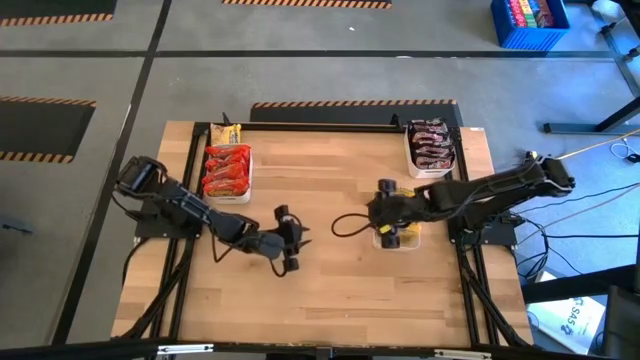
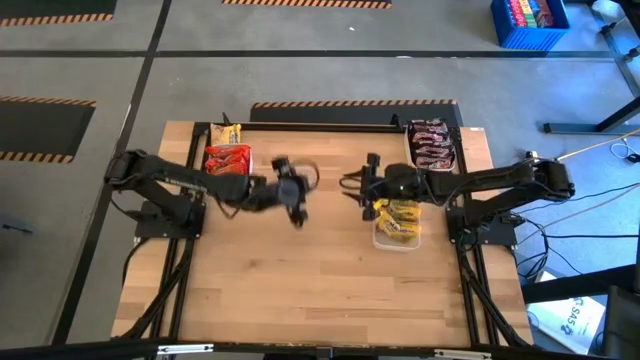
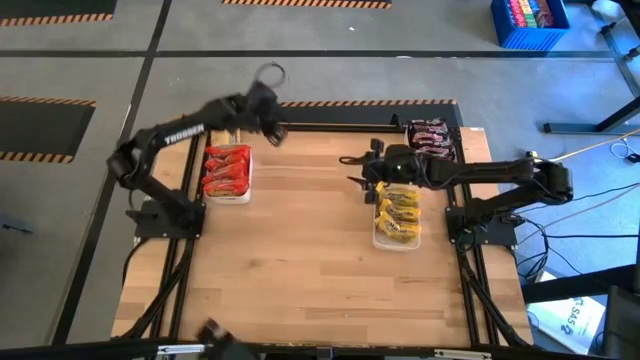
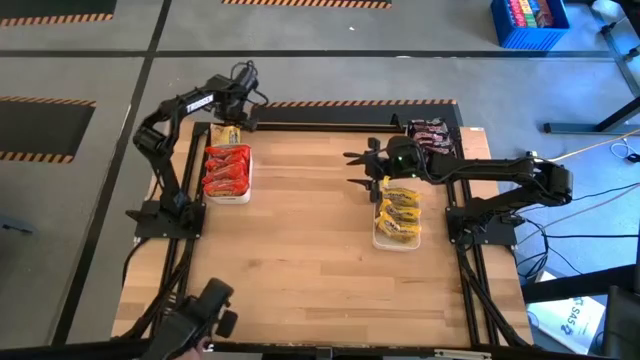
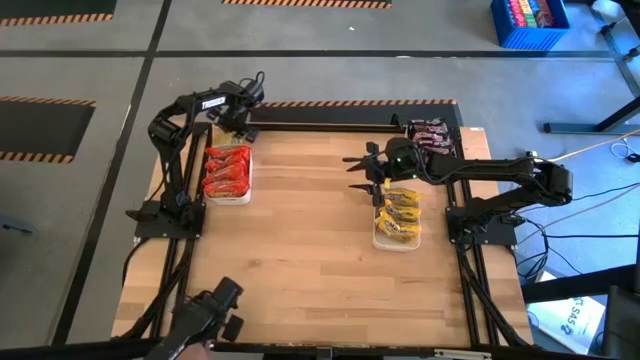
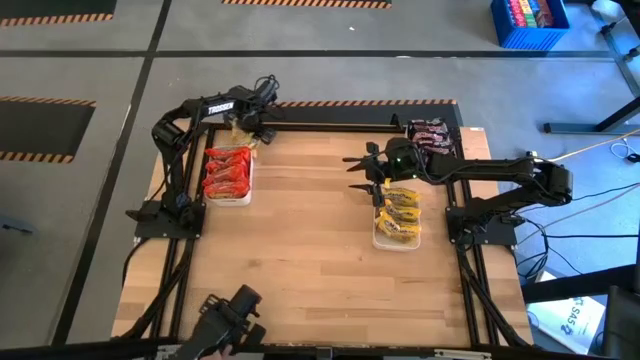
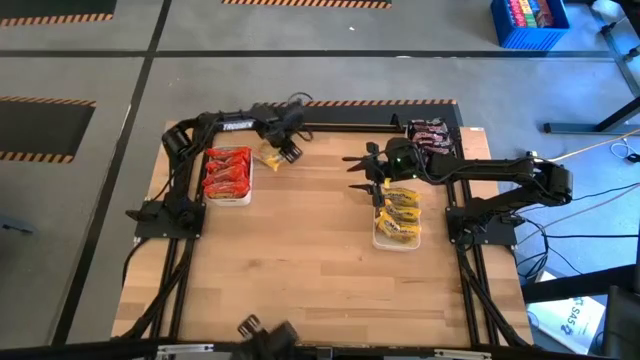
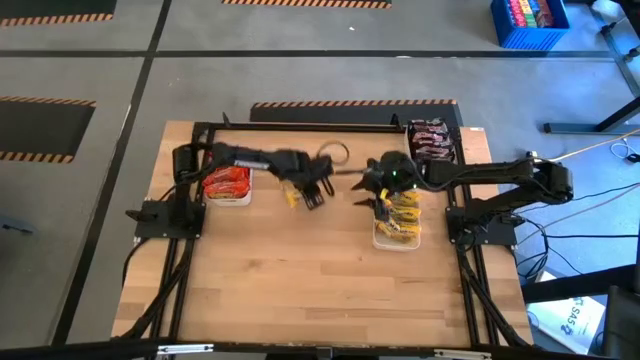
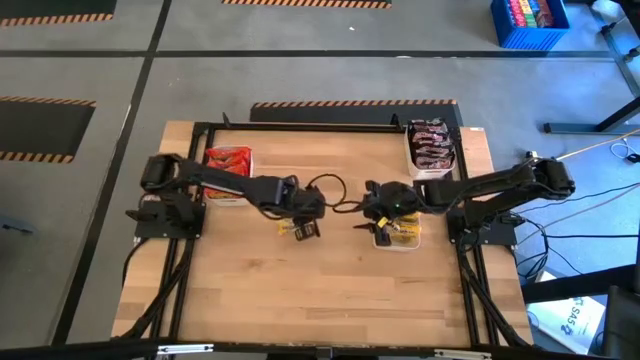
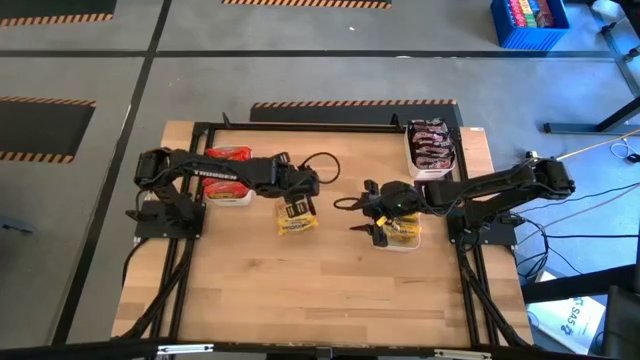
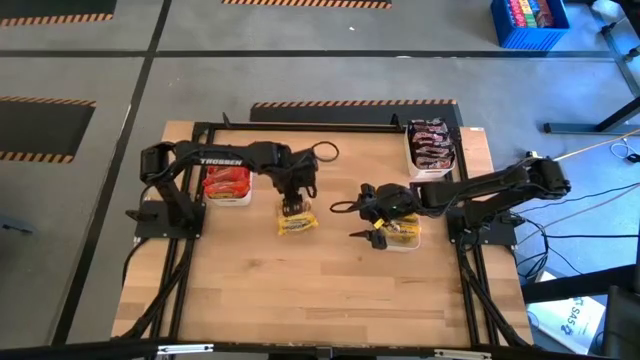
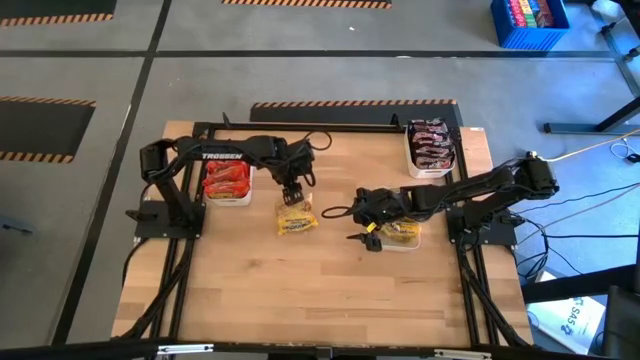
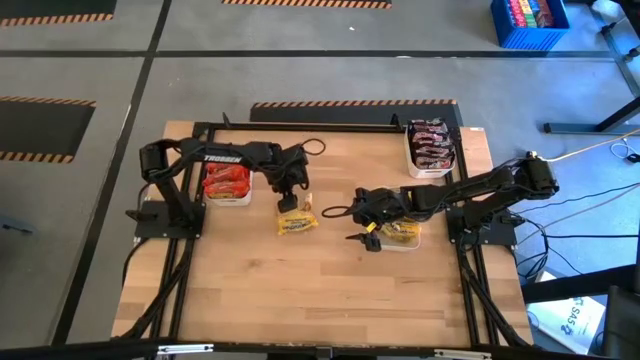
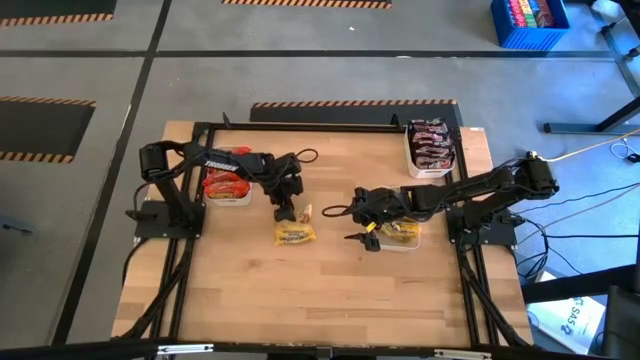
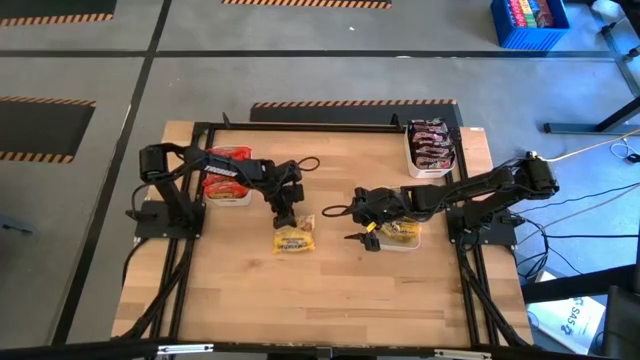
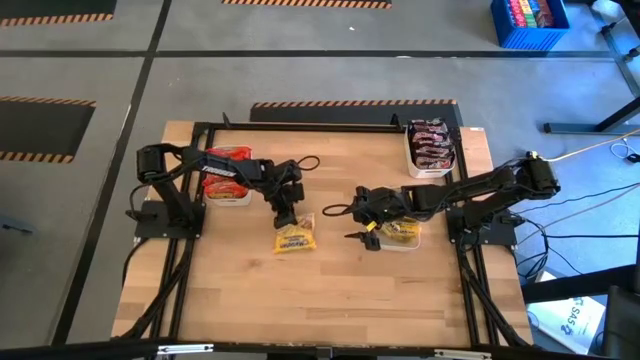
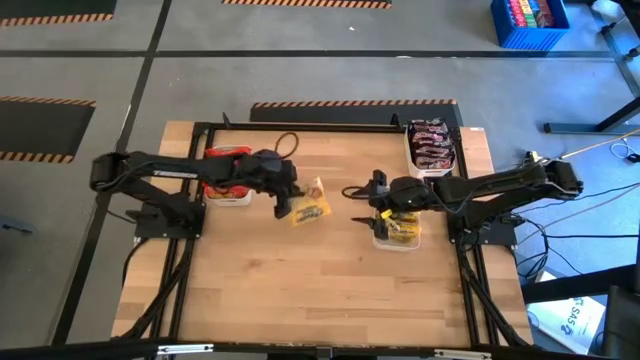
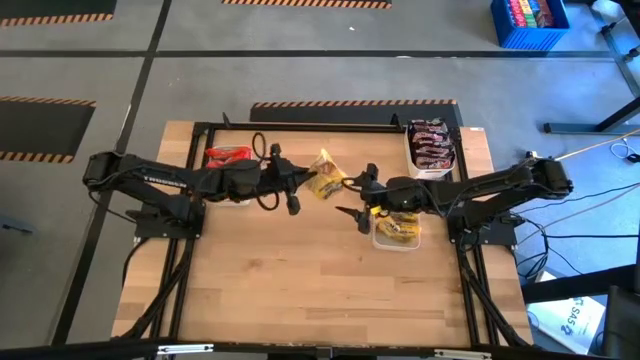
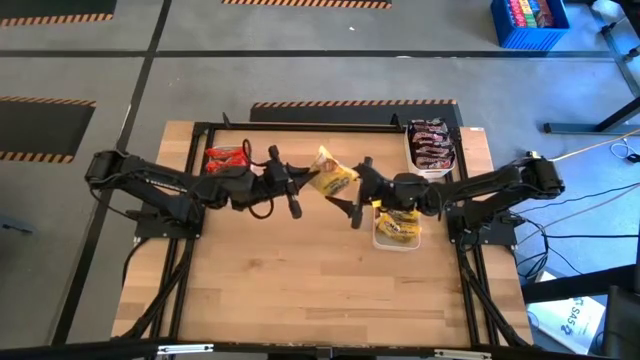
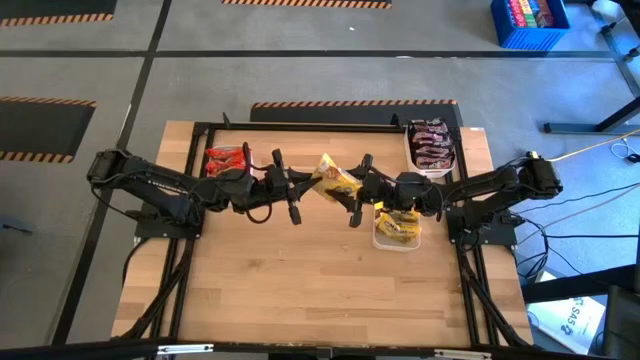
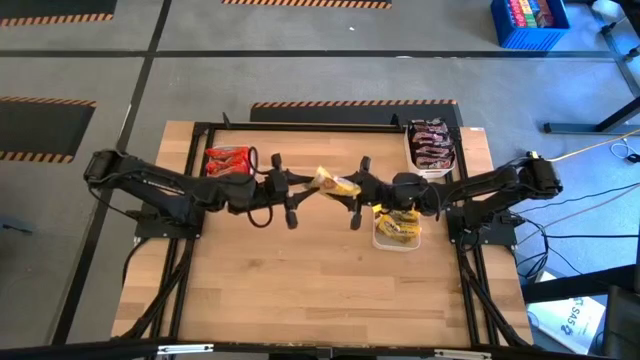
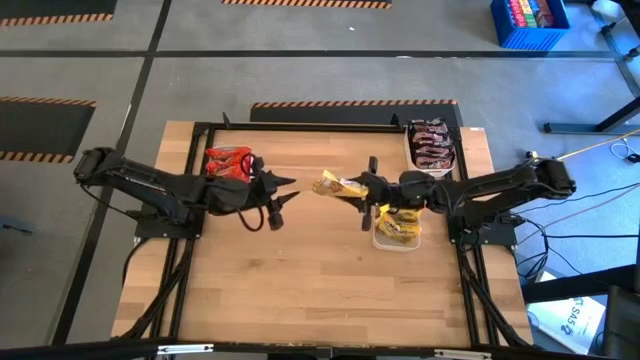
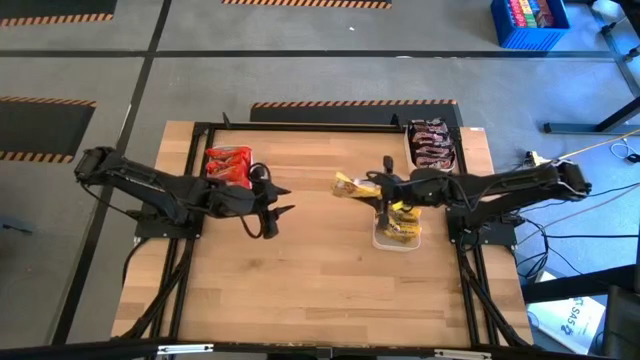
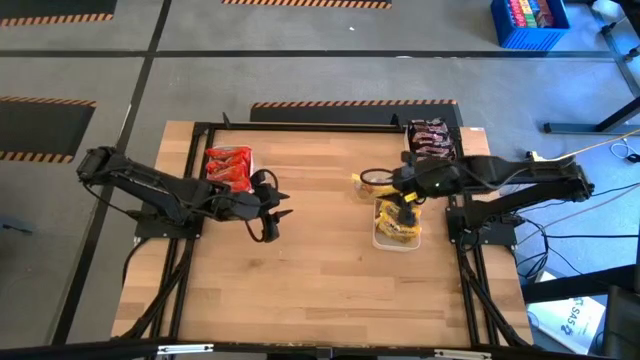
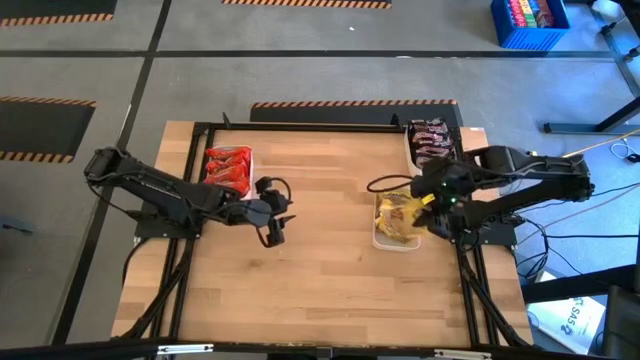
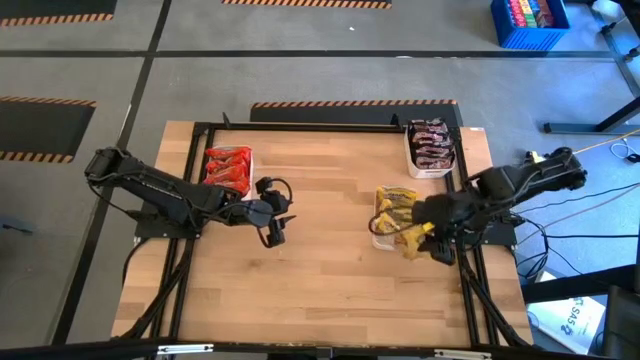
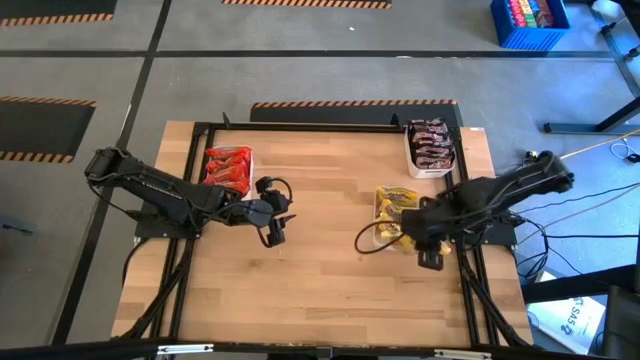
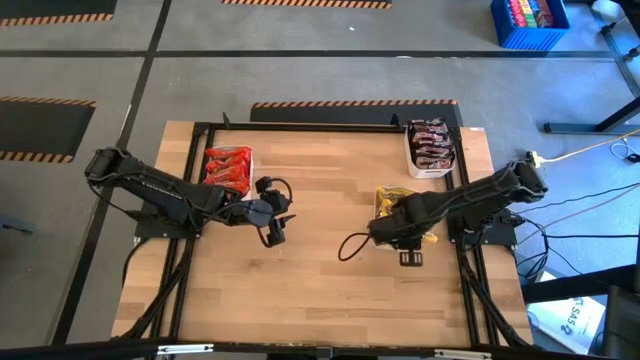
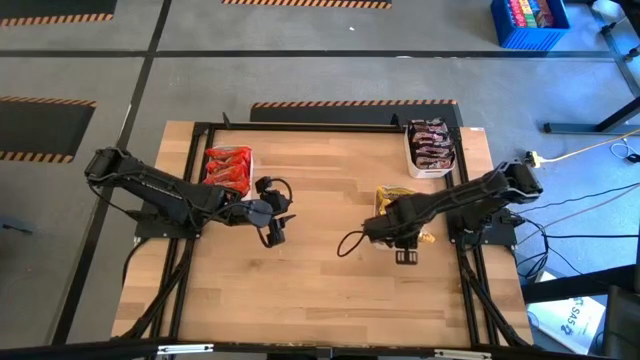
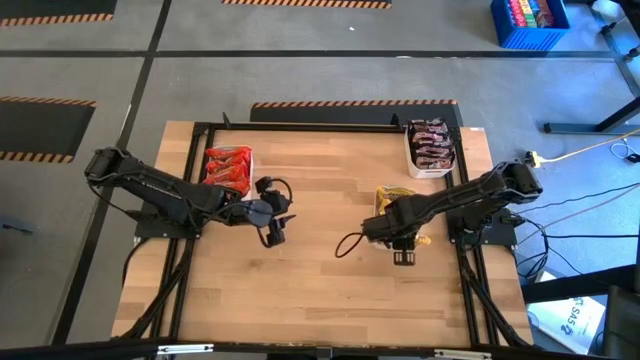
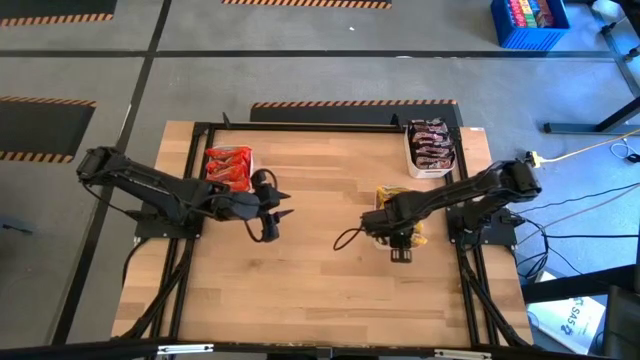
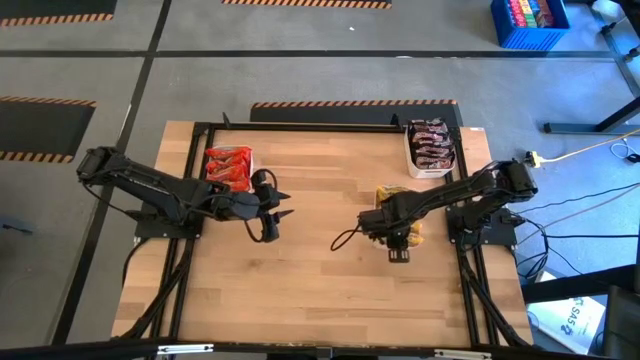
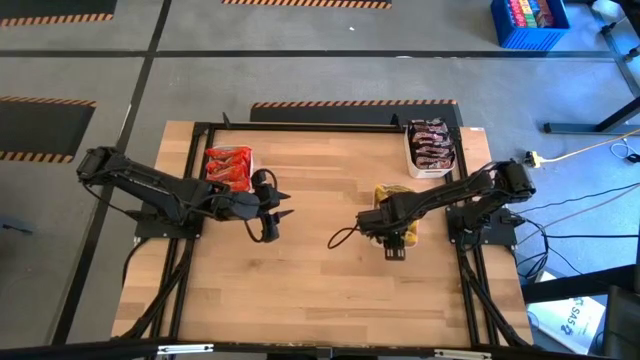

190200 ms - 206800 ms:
Task: Sort Maruchan noodles
Put the yellow noodle into the bottom white bin

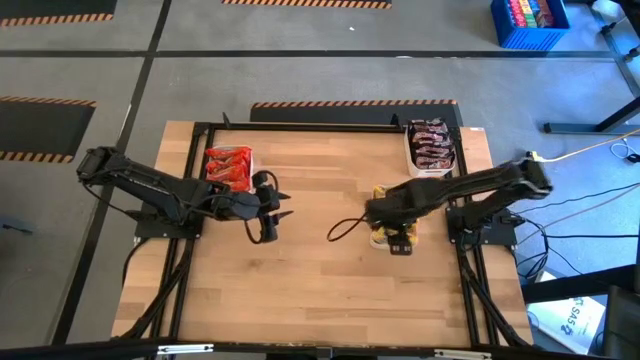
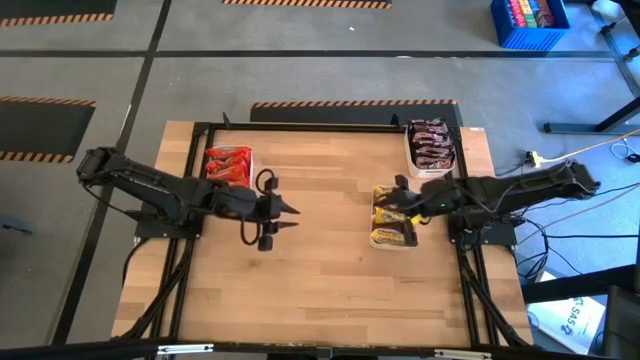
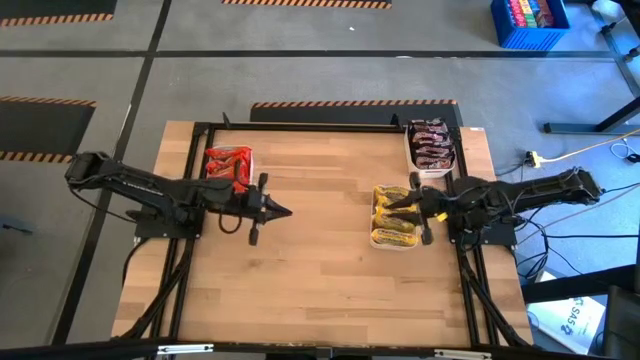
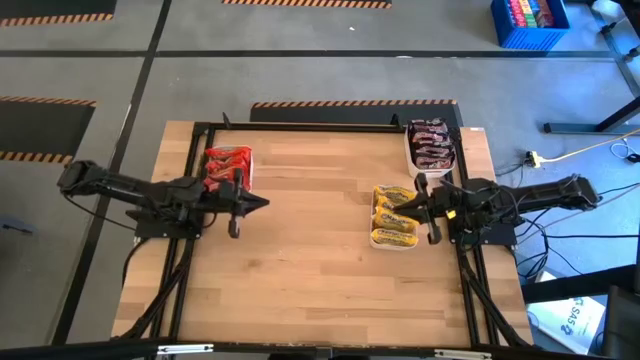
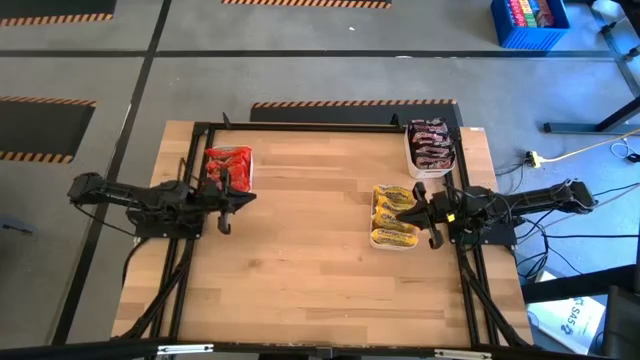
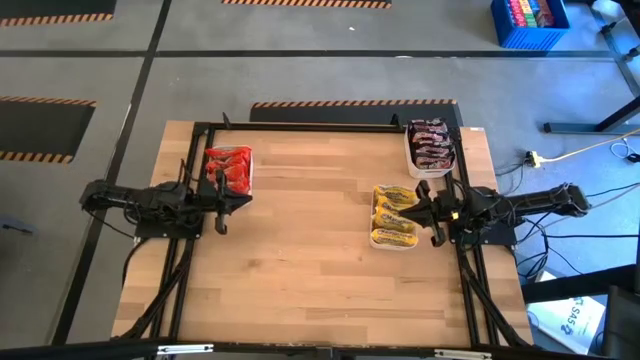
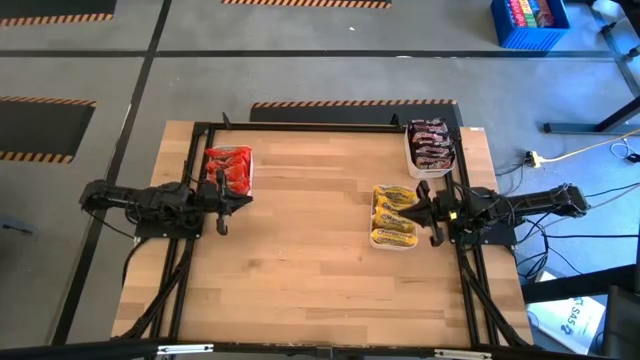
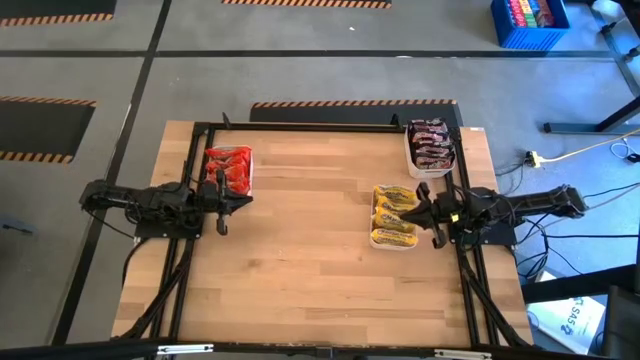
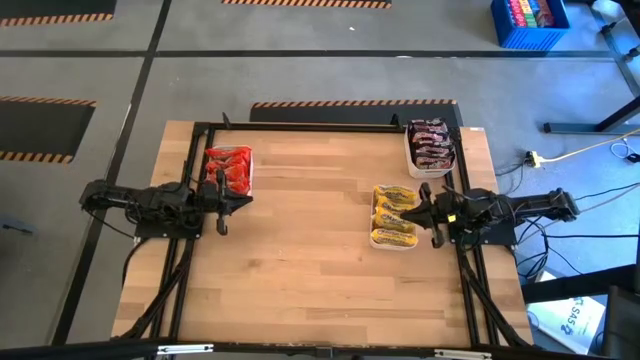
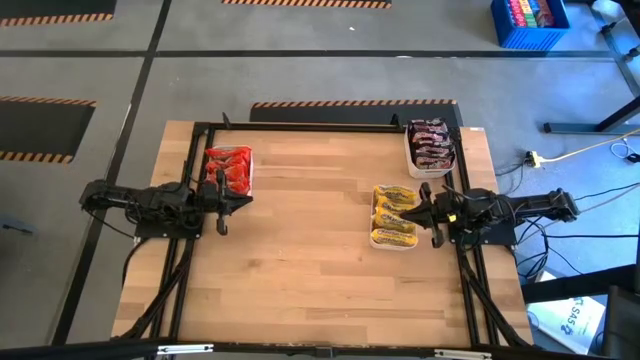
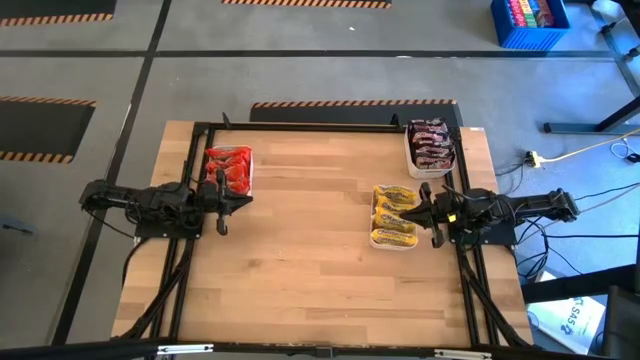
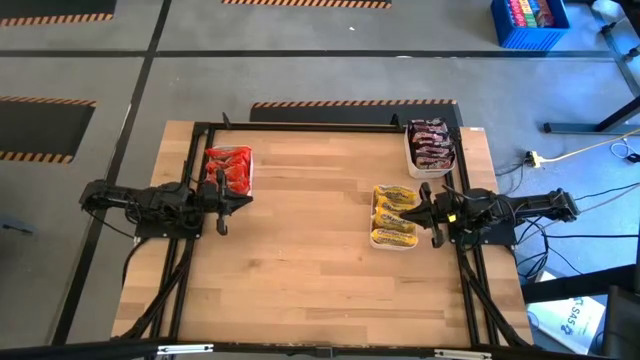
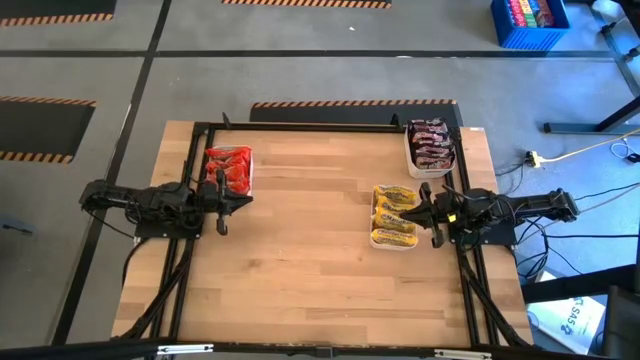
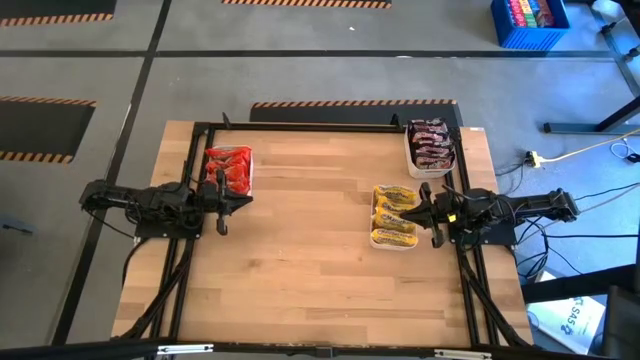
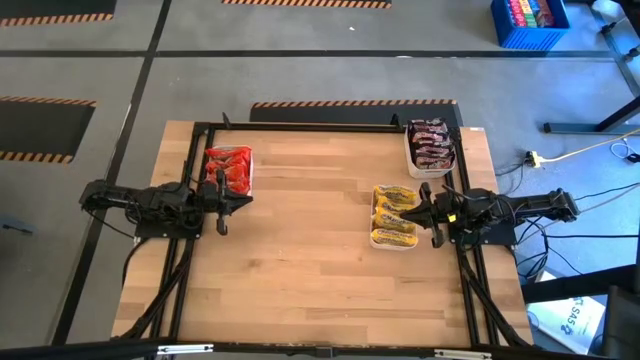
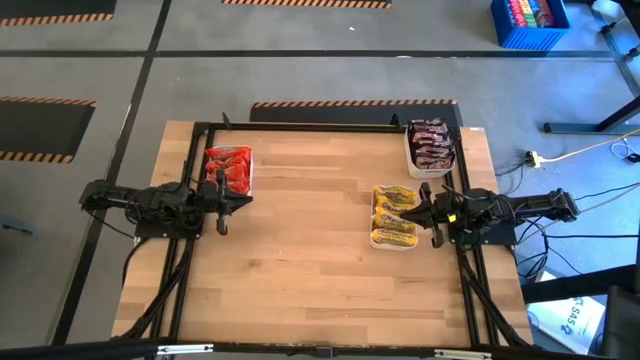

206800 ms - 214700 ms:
Return to Home Position
